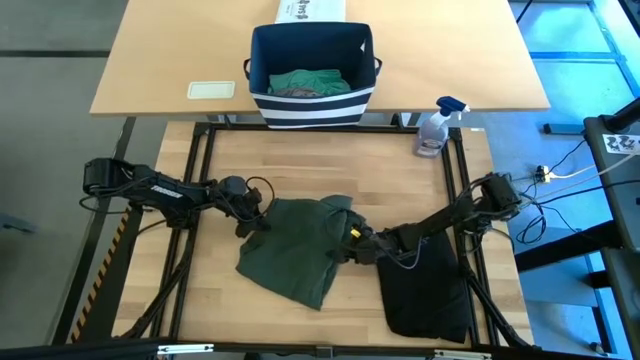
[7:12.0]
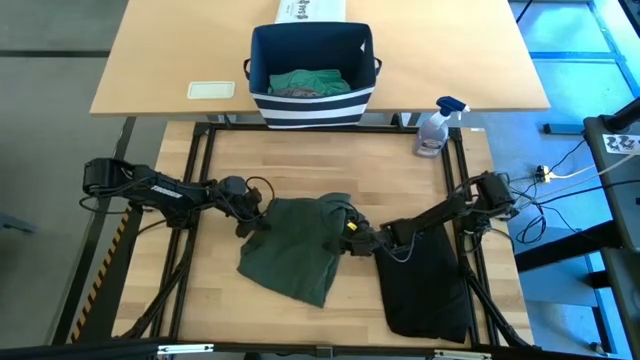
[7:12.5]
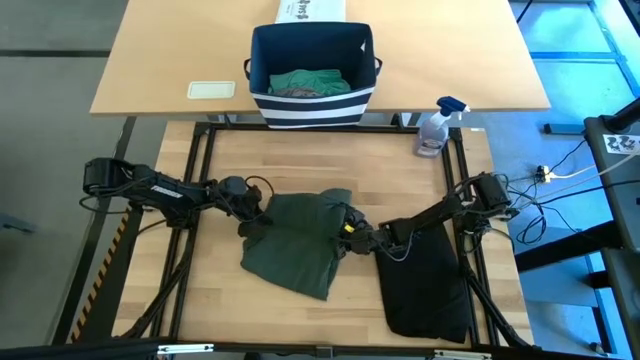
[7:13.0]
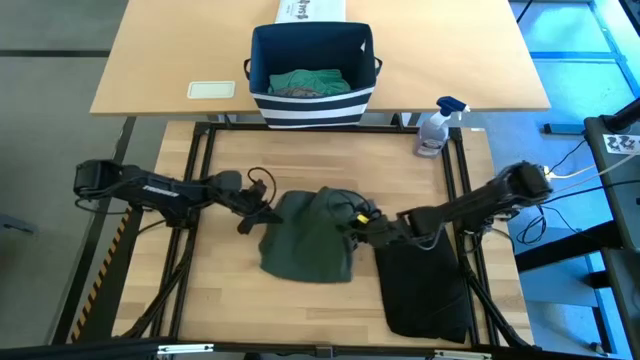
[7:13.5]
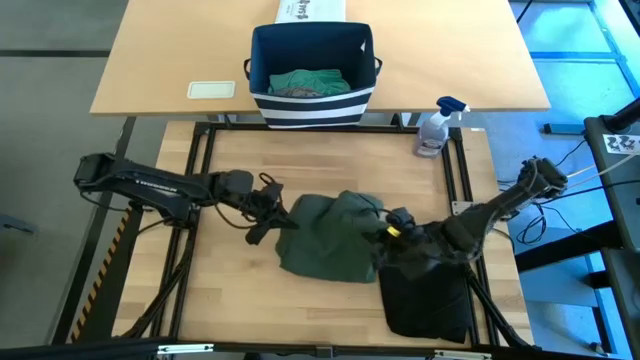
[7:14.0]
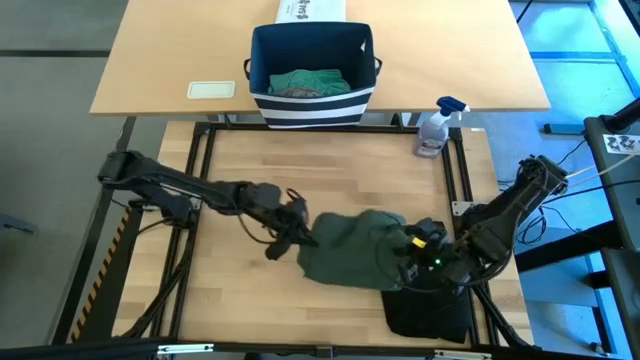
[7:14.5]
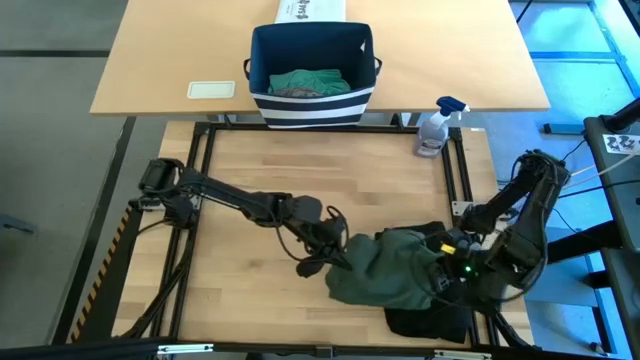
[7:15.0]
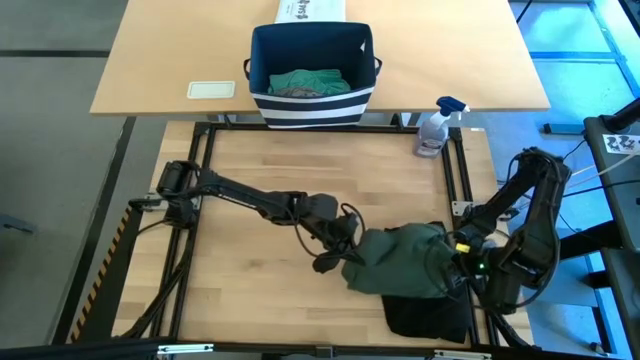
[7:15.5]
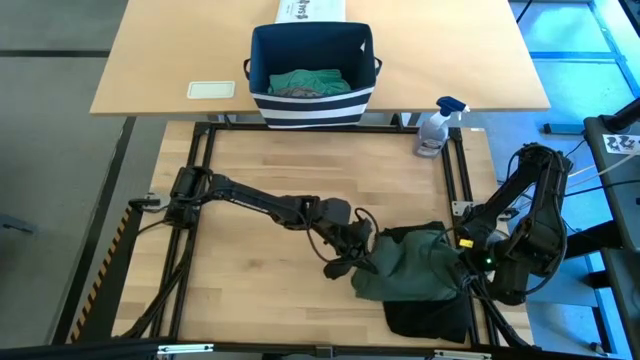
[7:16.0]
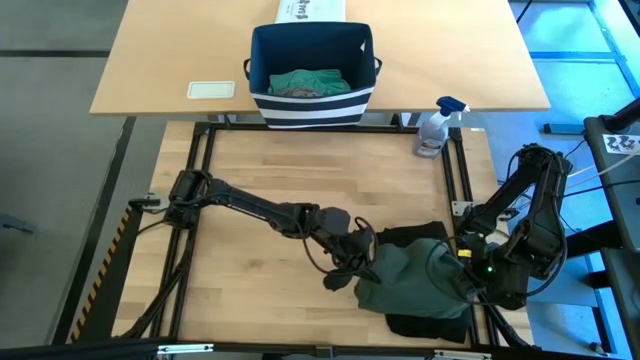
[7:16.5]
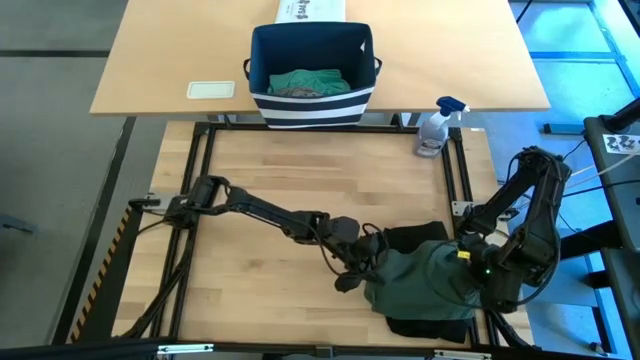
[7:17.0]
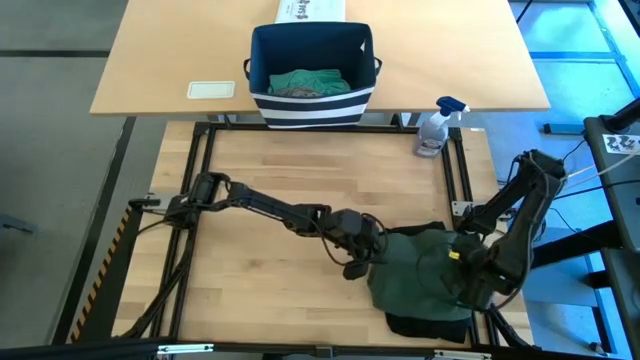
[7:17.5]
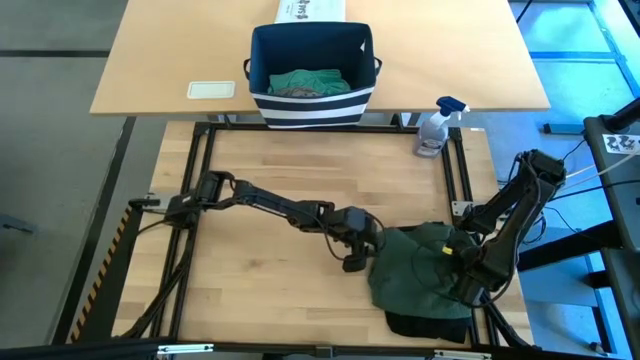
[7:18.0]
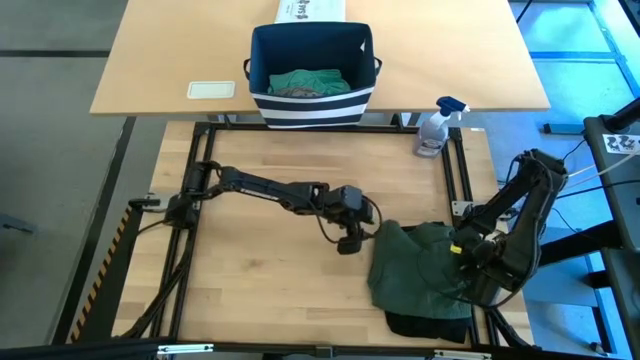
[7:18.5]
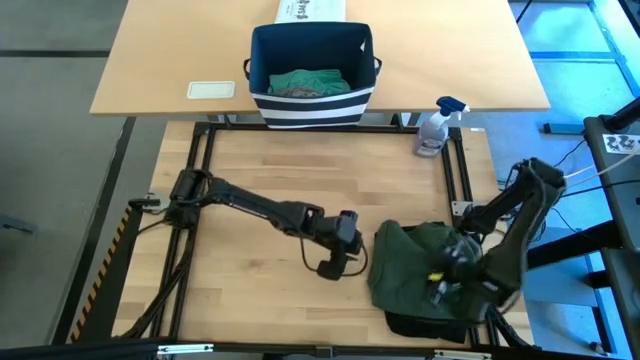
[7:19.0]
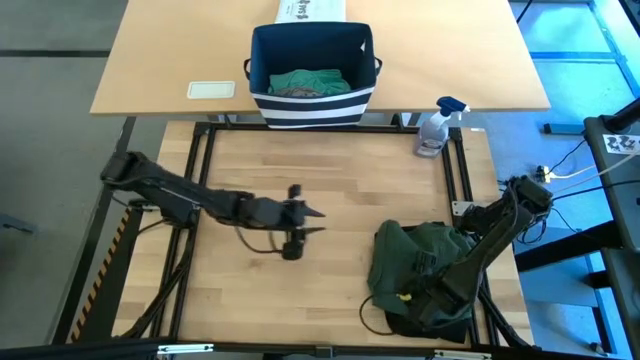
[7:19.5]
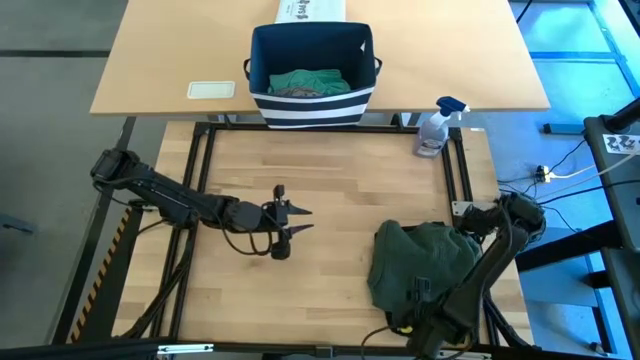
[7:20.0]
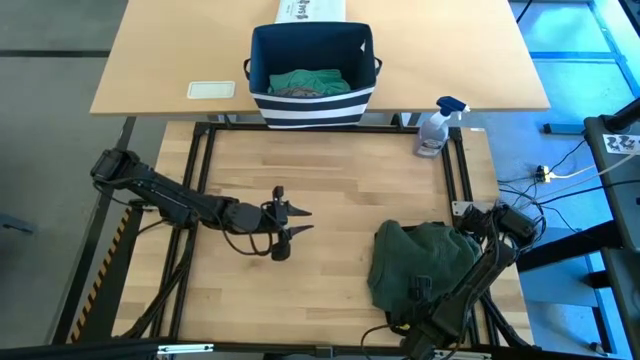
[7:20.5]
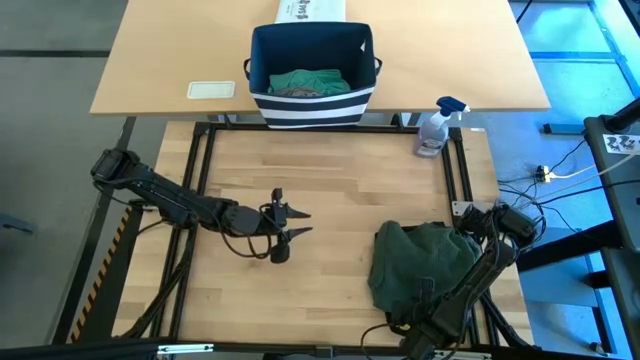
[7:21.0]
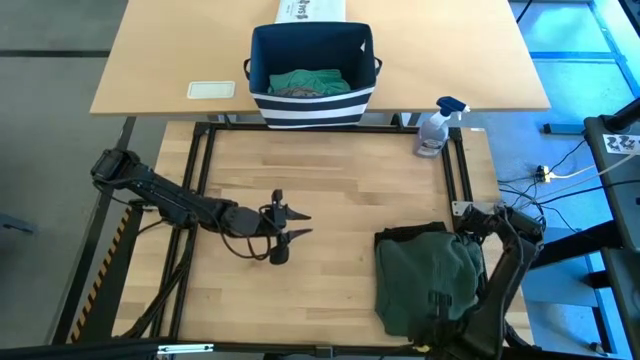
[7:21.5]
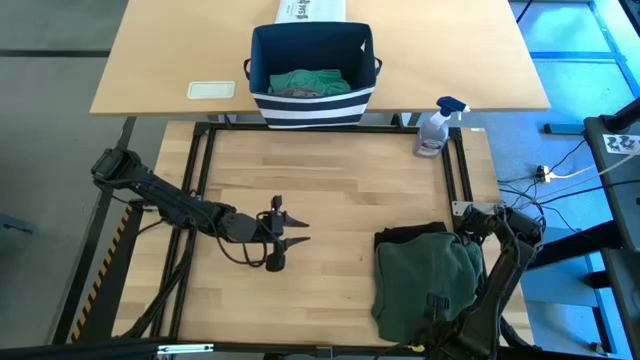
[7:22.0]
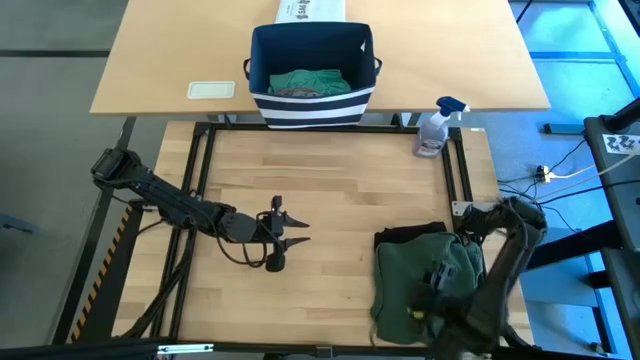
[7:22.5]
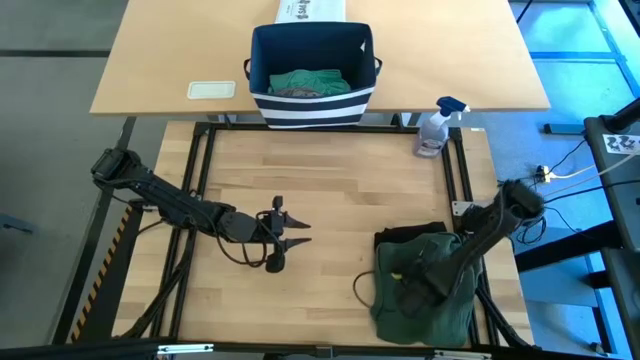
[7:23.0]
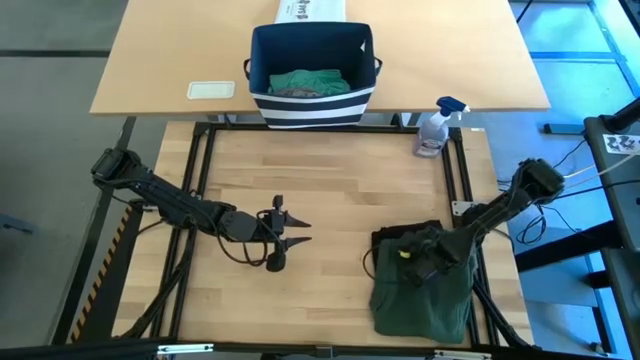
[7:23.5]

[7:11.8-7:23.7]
Task: Fold Laundry from Bin
Stack the folded green polo shirt on top of the folded black shirt

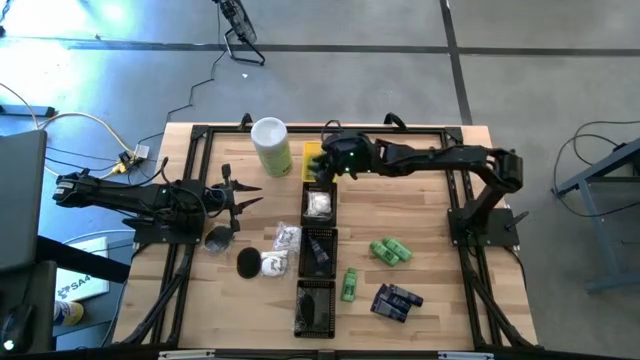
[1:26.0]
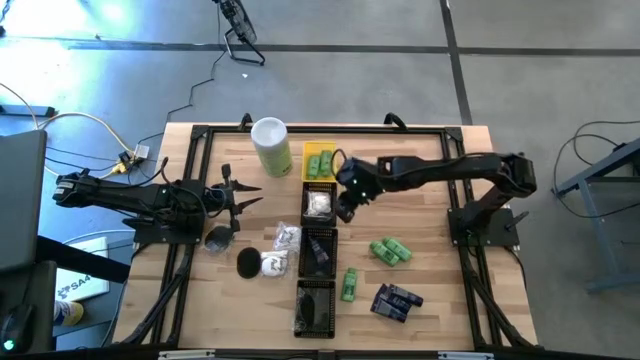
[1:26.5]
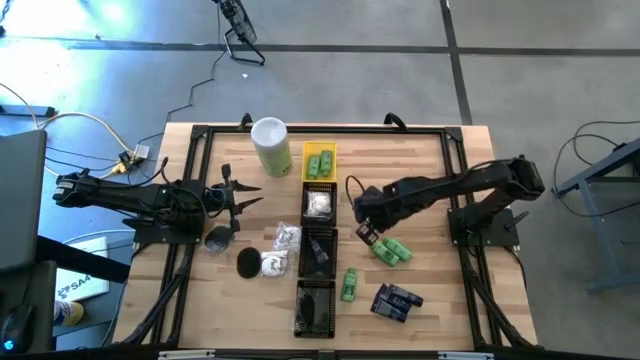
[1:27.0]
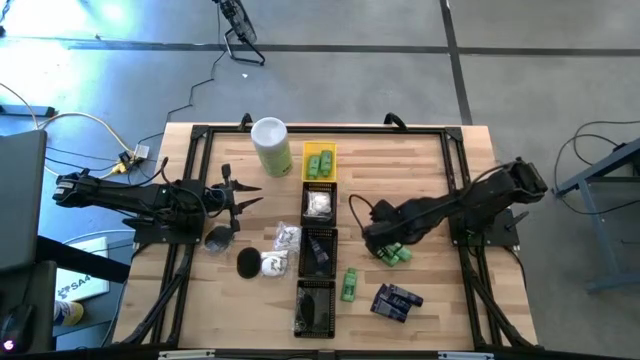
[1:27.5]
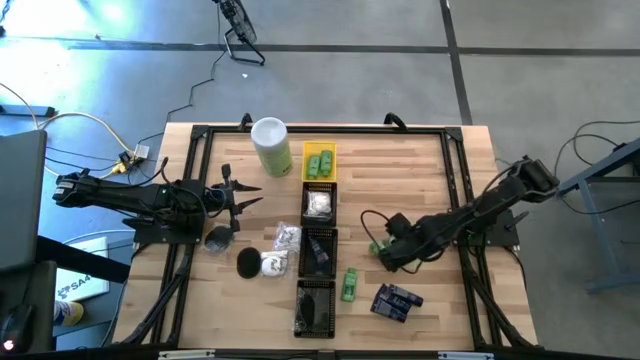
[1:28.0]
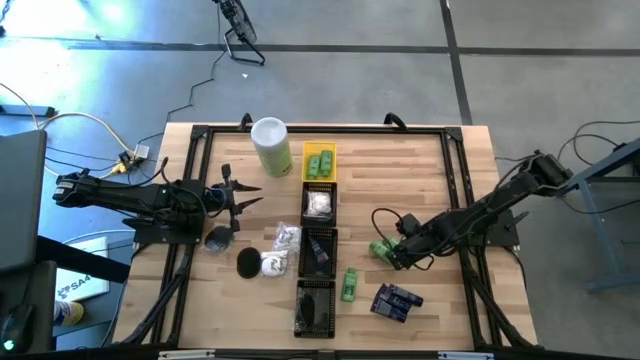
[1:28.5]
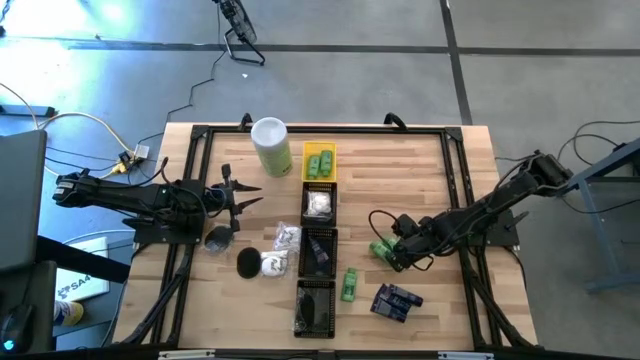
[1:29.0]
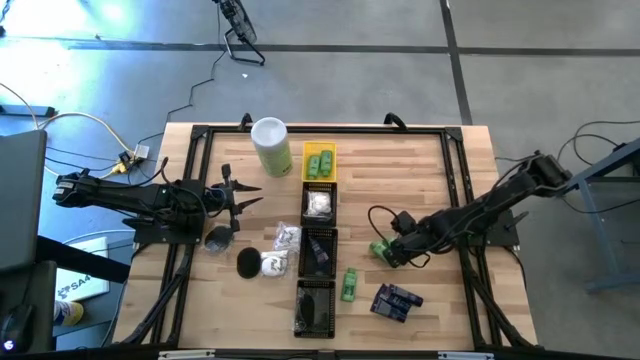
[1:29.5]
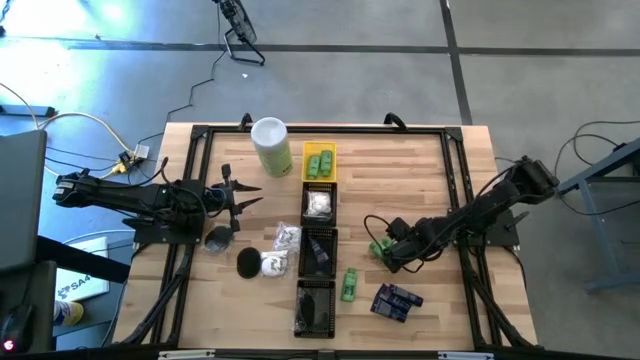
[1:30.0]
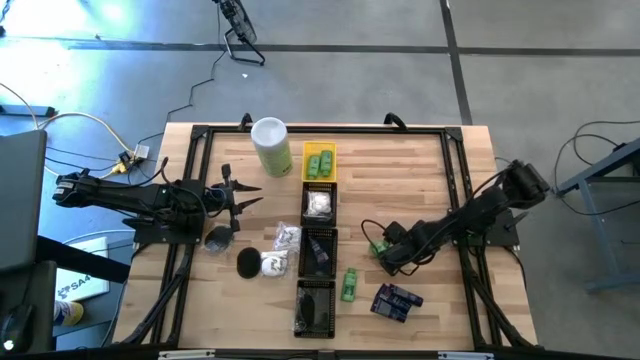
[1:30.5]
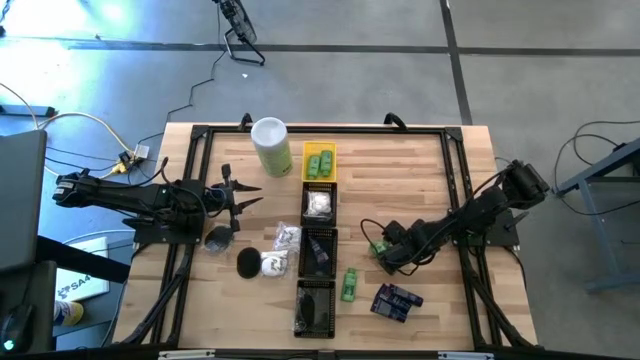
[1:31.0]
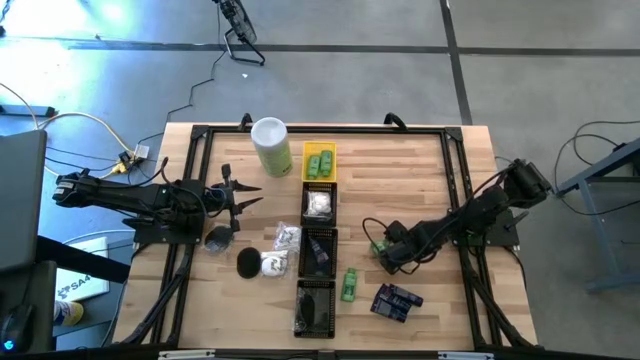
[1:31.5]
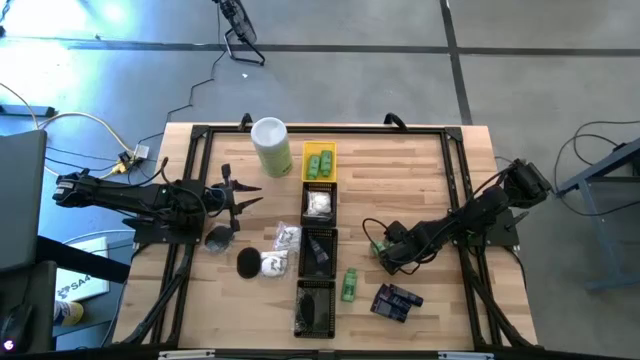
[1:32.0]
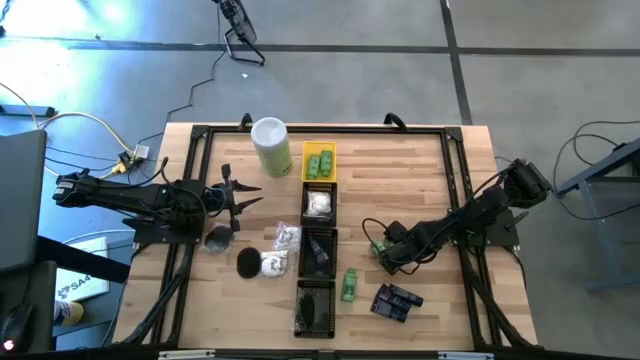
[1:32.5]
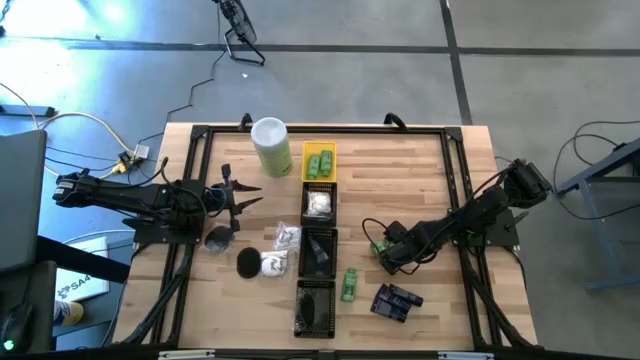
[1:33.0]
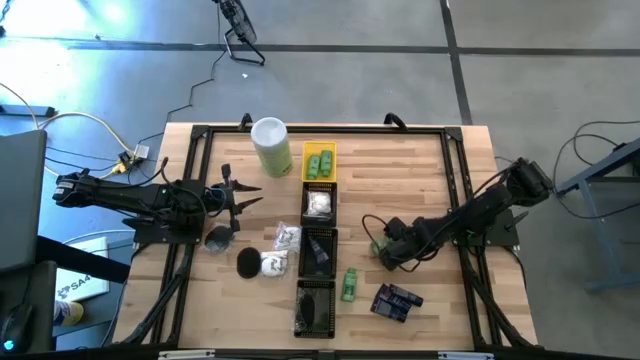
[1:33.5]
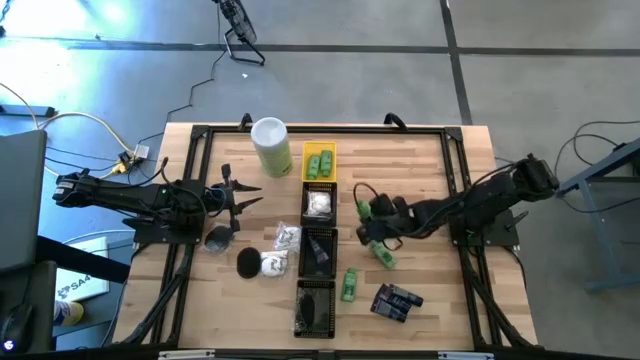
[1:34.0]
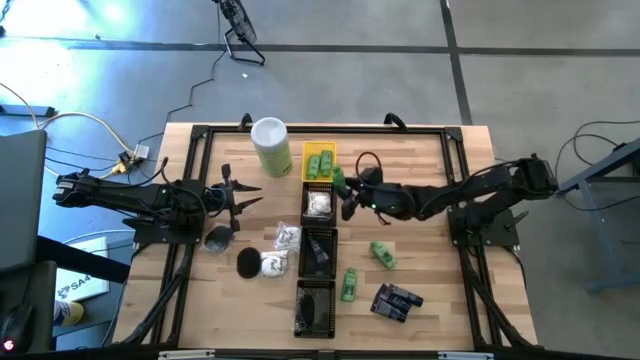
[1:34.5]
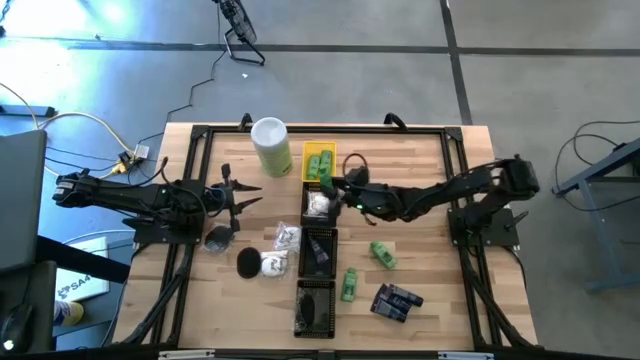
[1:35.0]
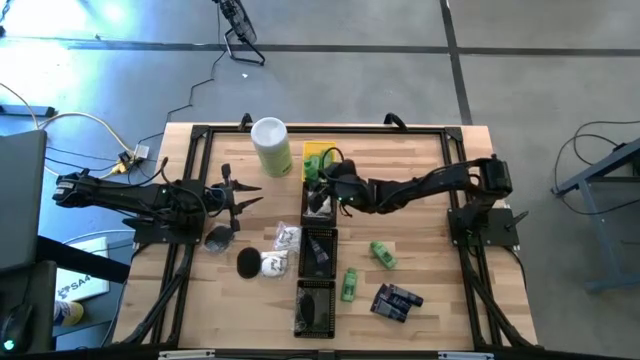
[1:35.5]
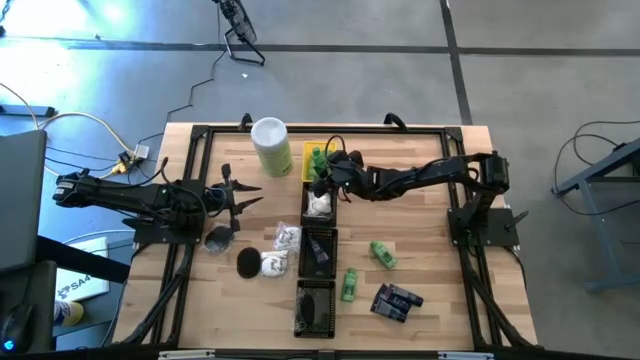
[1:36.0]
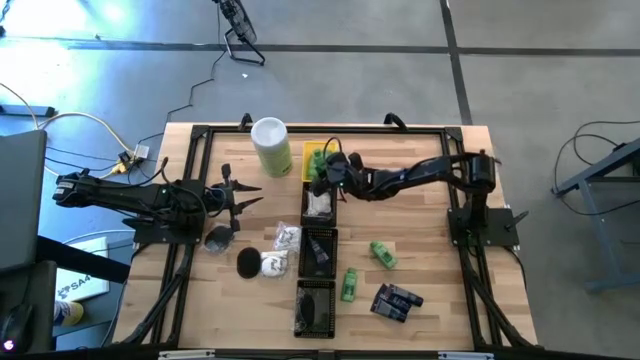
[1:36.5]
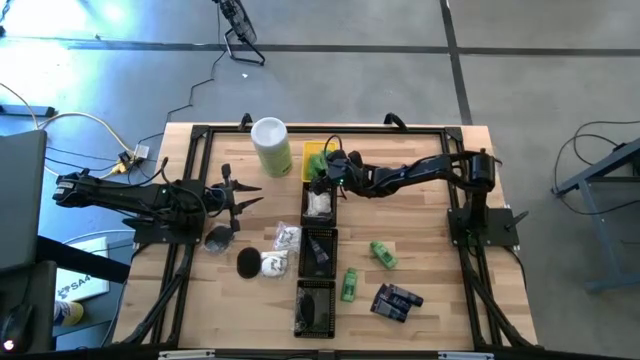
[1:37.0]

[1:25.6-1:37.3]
Task: Pick & Place Travel size toiletries
Put the green bottle into the yellow basket
